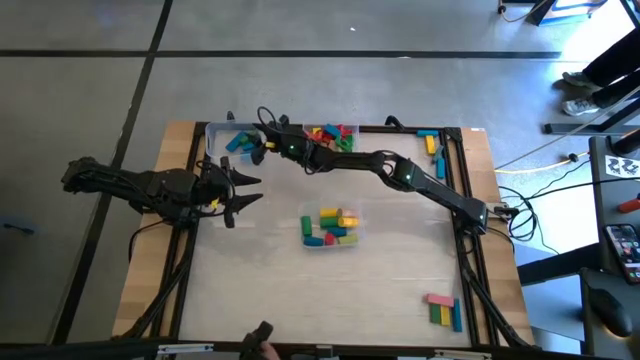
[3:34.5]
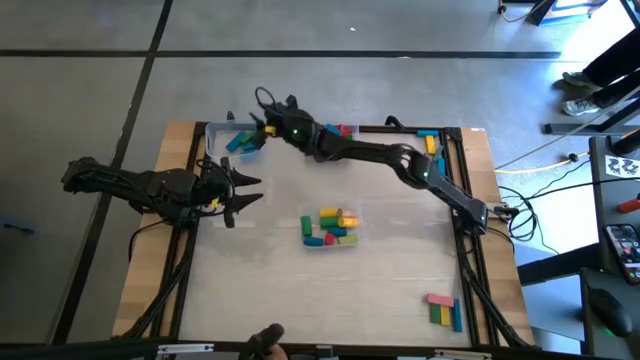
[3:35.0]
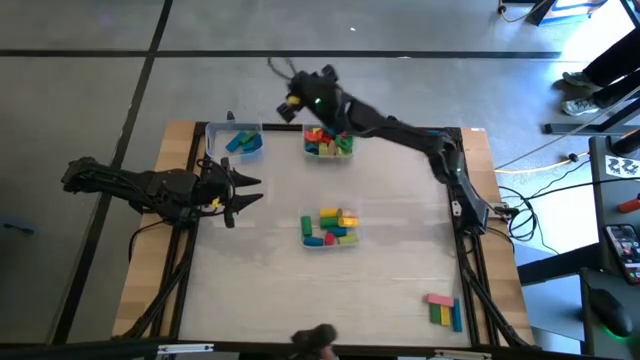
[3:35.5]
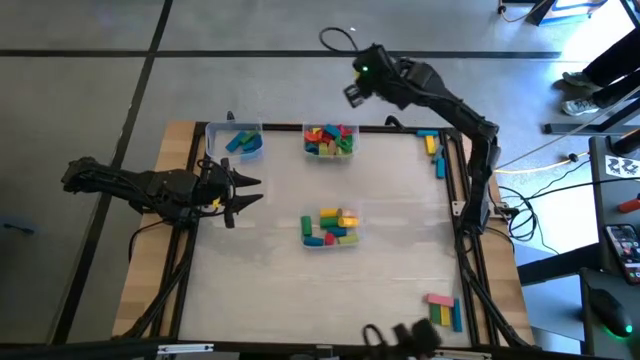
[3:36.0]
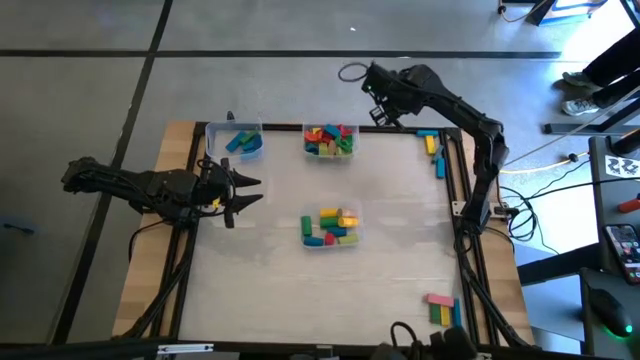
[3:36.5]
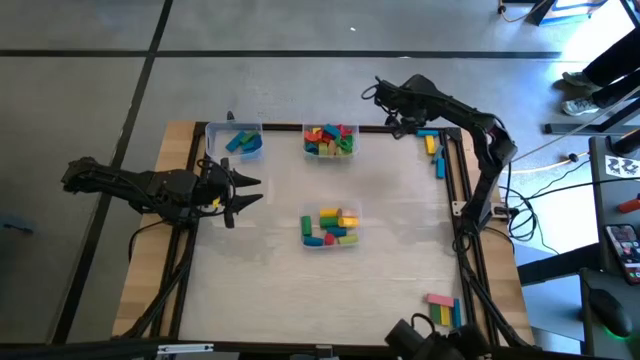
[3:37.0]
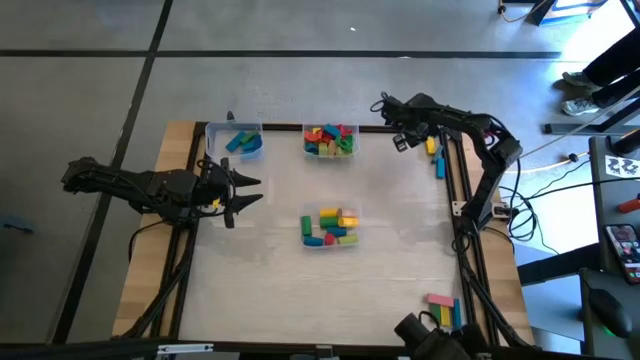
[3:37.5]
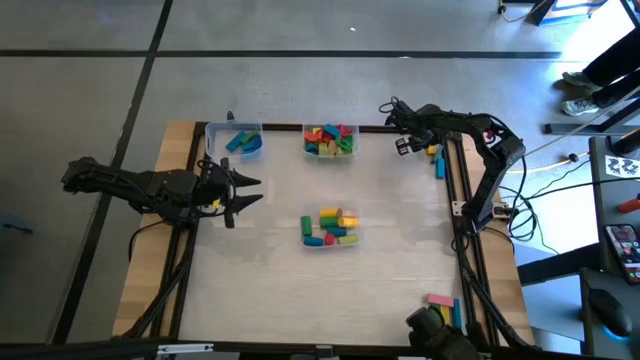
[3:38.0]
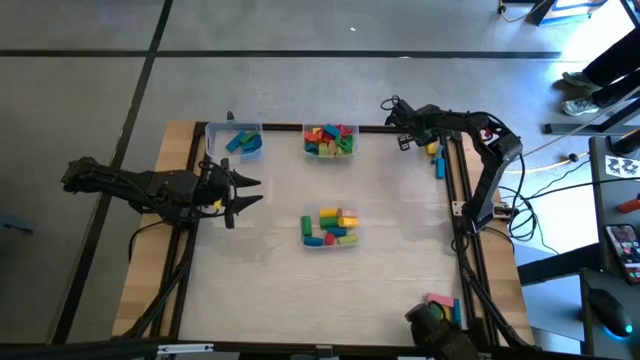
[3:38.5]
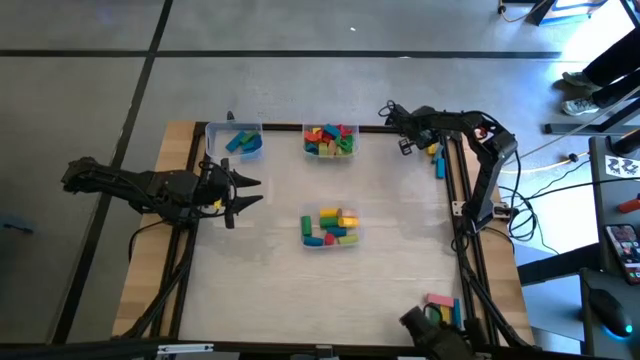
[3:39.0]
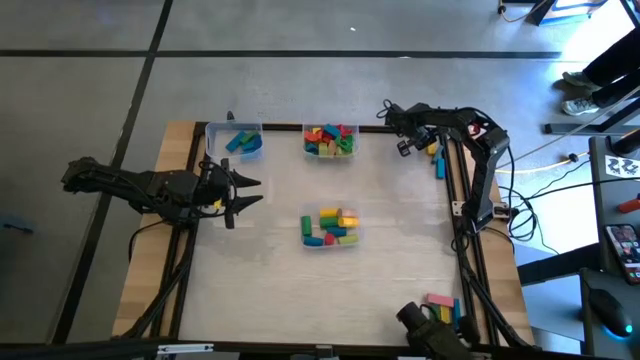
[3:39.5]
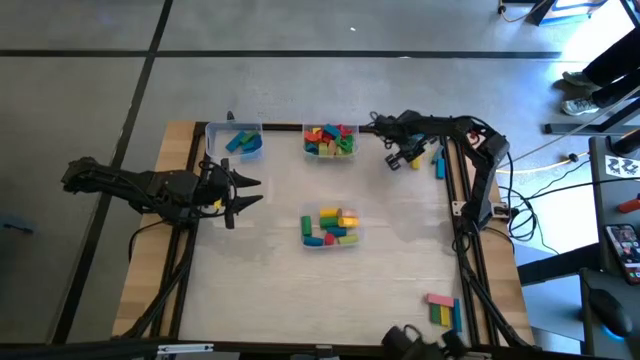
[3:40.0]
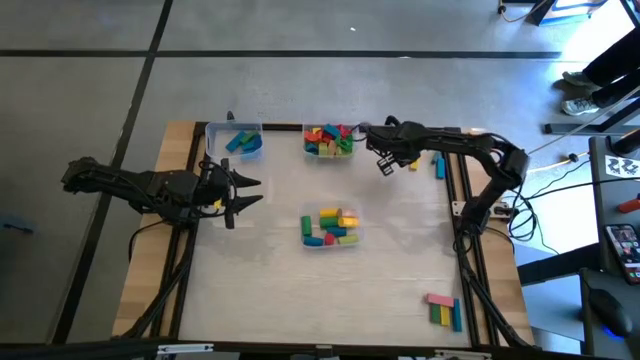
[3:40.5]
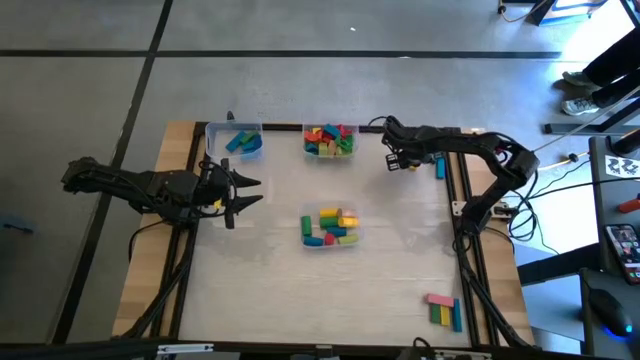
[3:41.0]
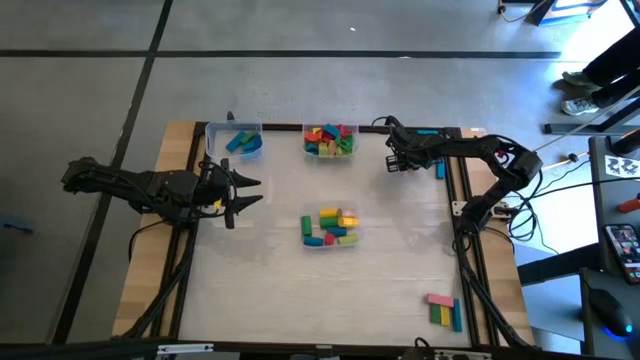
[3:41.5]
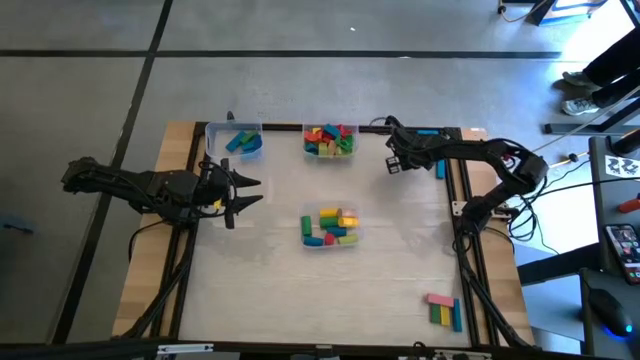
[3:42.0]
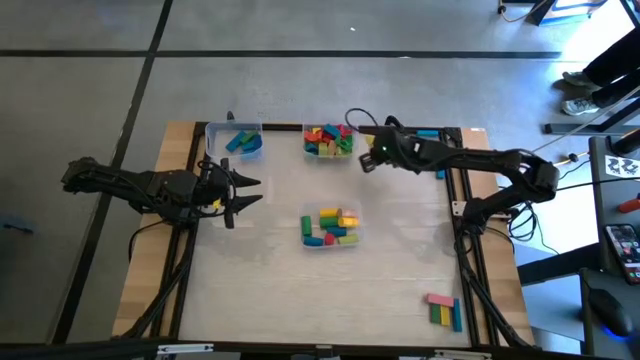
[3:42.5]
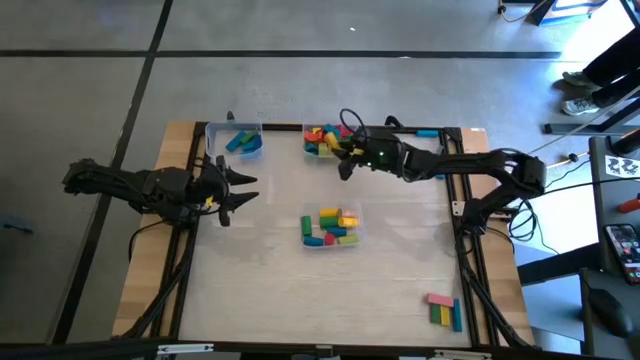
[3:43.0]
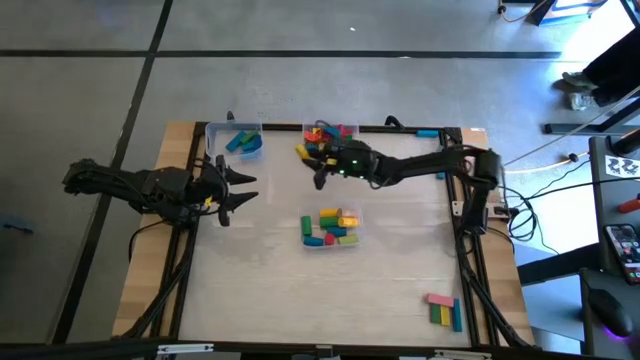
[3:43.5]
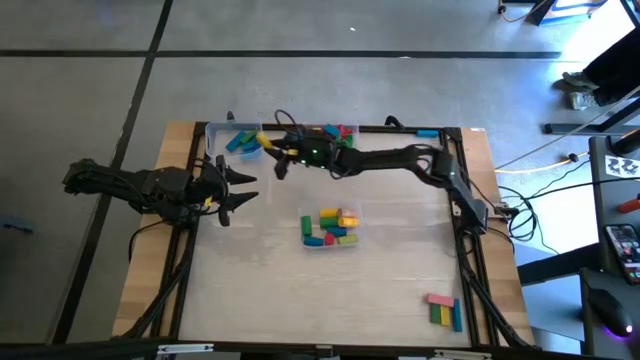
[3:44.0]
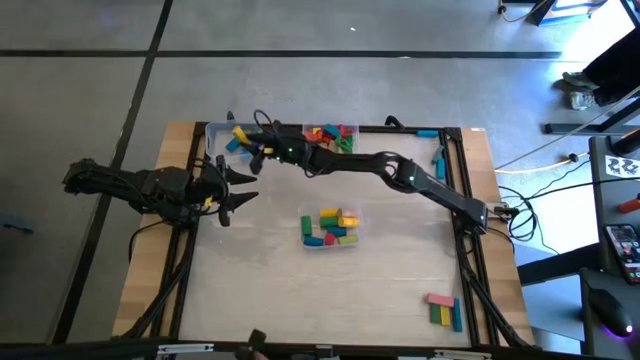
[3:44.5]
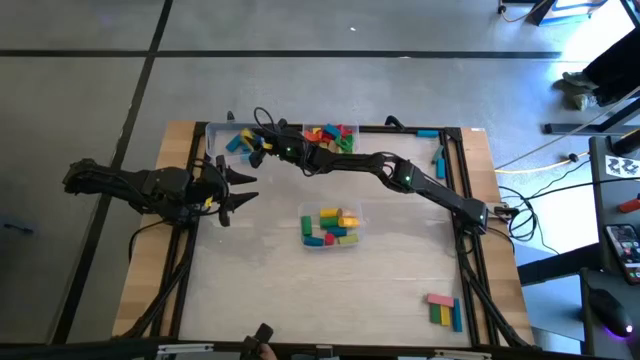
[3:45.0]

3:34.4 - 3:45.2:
Task: Sort blocks by size
Put the yellow rectangular block into the top left transparent bin

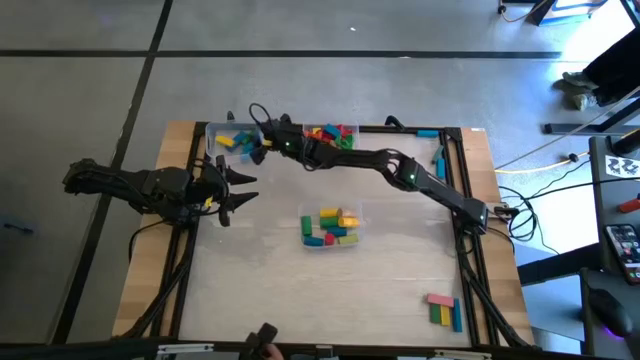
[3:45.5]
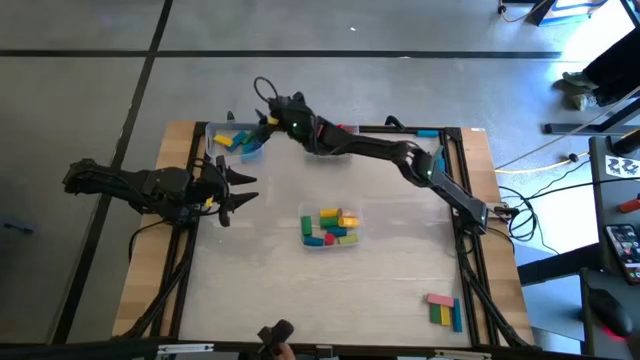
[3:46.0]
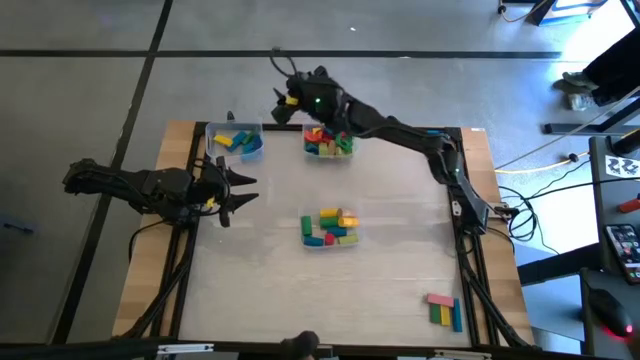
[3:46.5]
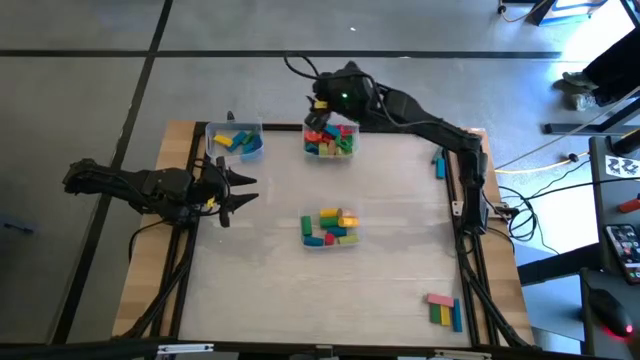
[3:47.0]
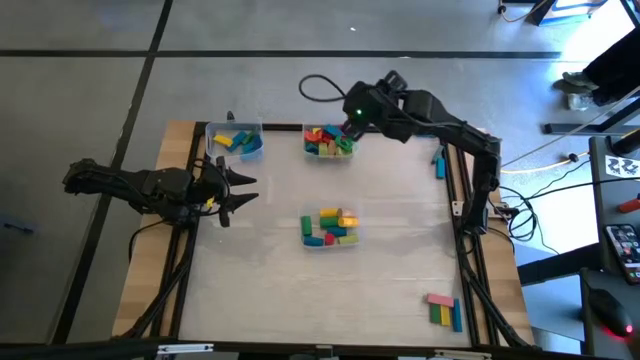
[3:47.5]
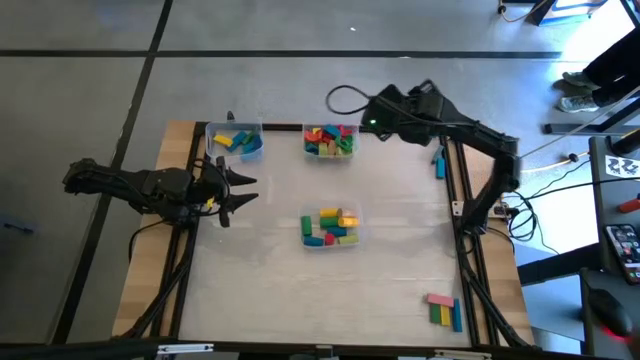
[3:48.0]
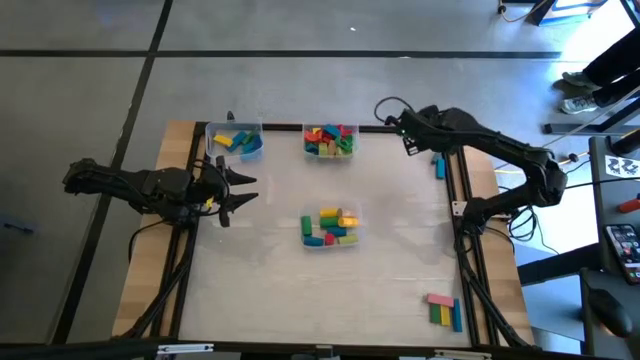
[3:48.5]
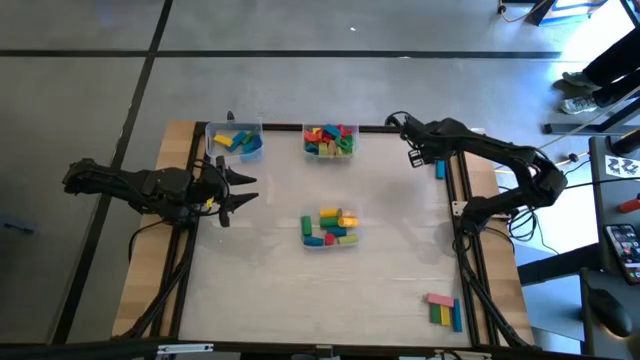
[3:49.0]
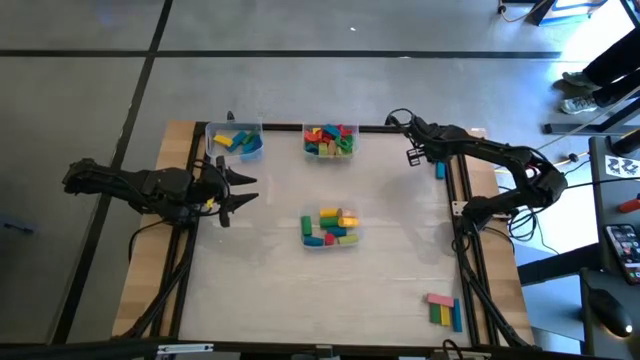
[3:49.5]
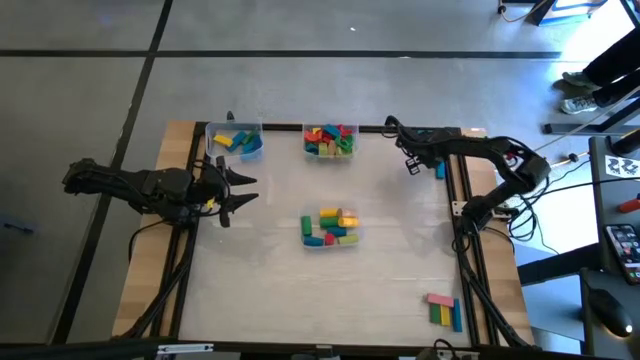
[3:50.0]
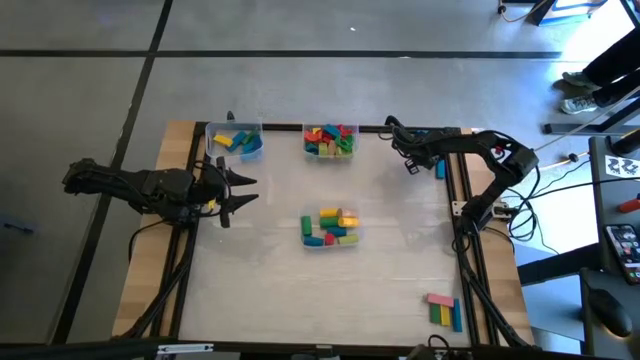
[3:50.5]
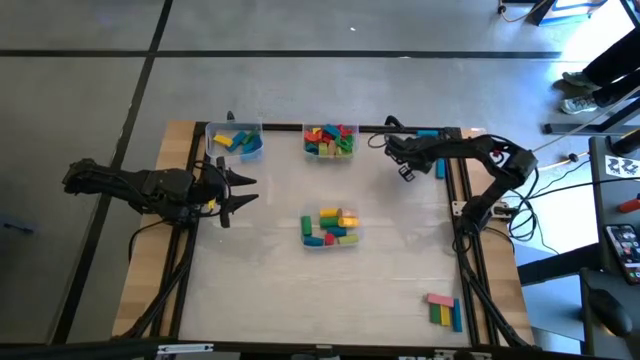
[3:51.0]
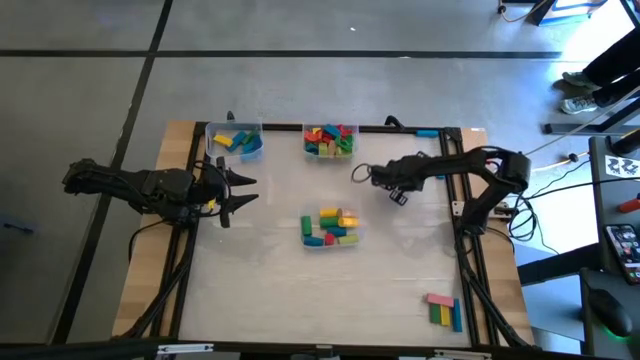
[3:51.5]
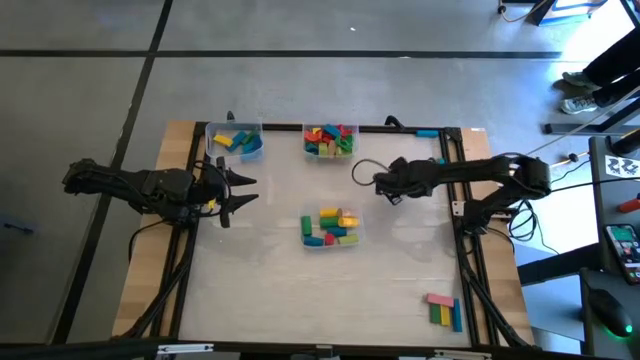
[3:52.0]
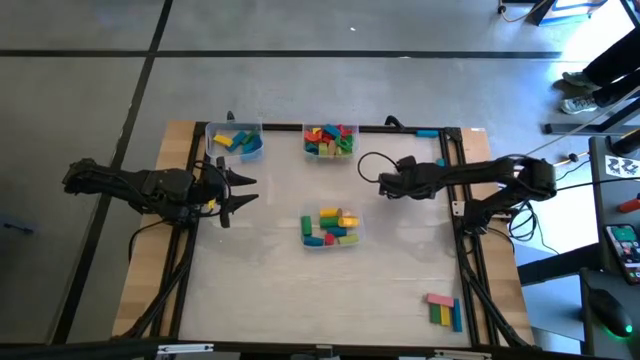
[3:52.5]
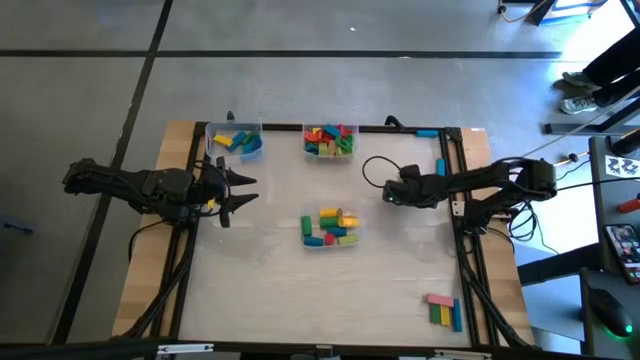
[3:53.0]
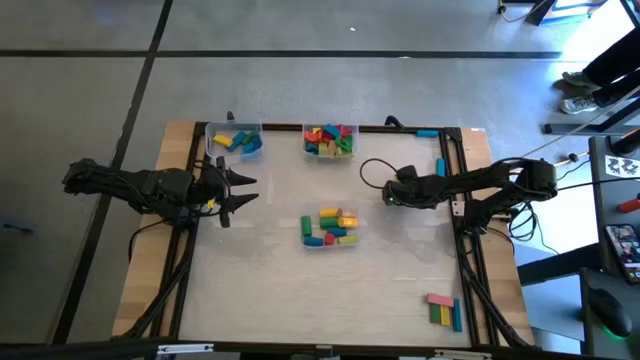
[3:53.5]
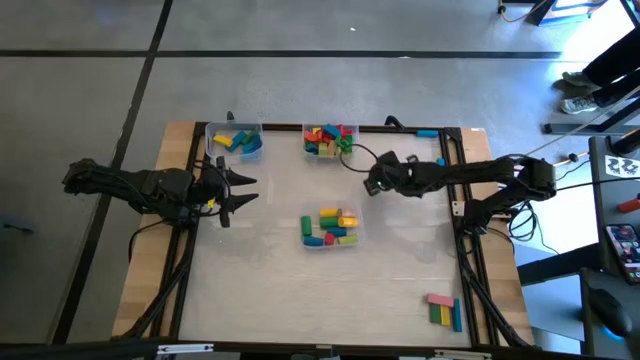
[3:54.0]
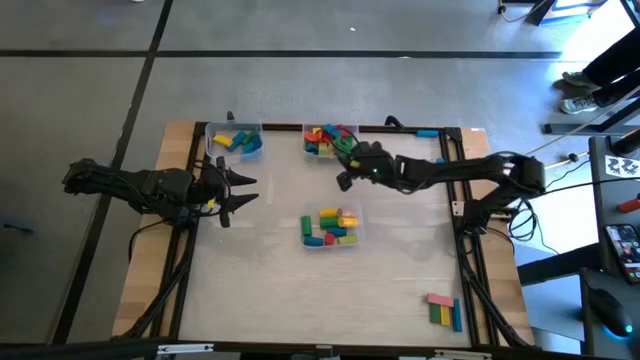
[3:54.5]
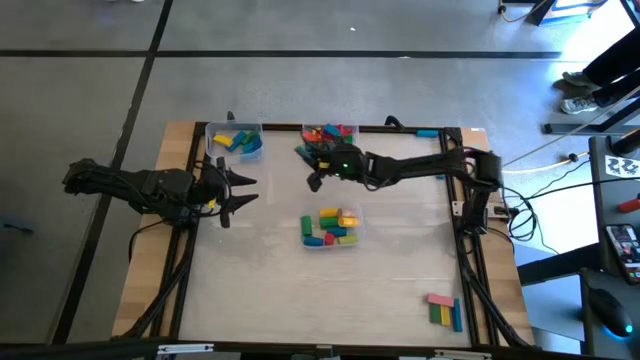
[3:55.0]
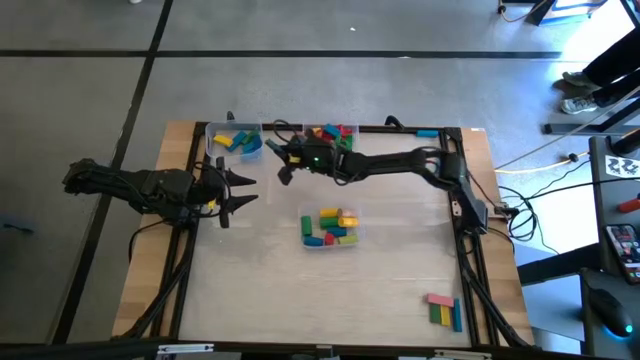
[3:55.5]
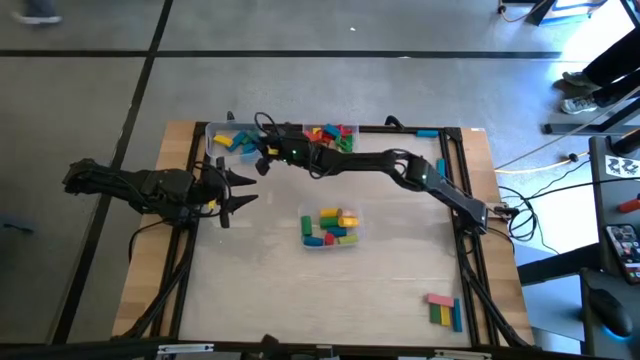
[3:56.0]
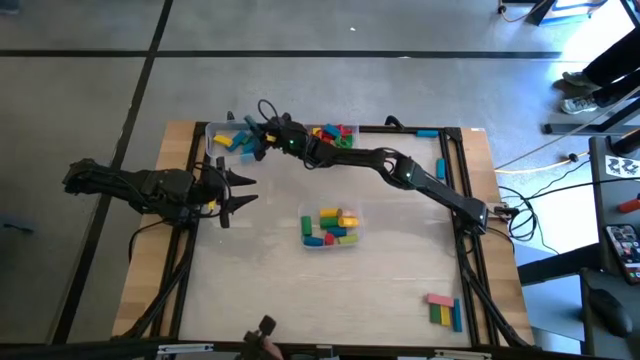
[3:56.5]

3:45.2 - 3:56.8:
Put the dark green rectangular block into the top left transparent bin
